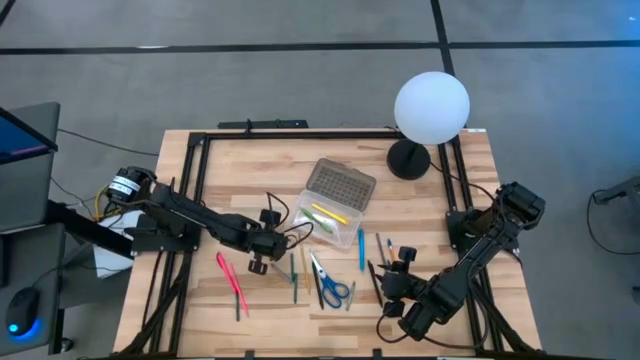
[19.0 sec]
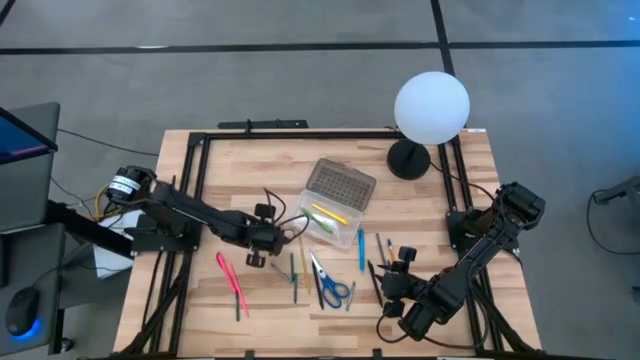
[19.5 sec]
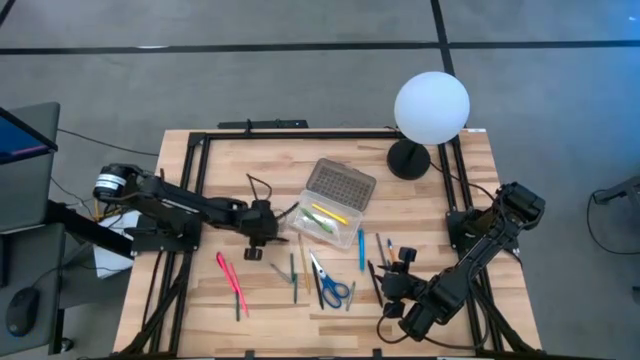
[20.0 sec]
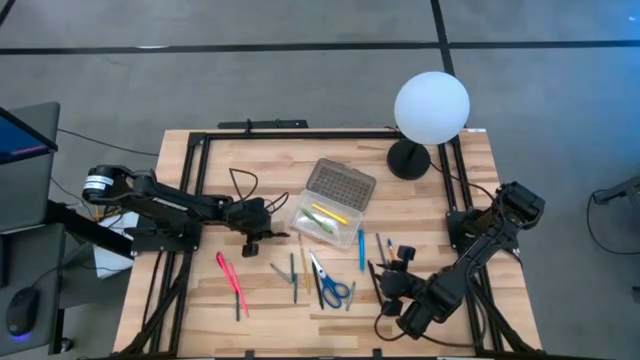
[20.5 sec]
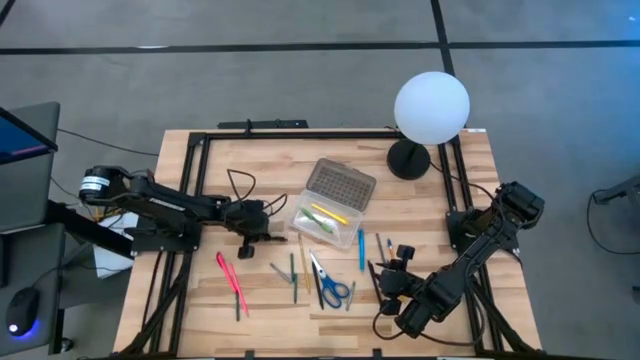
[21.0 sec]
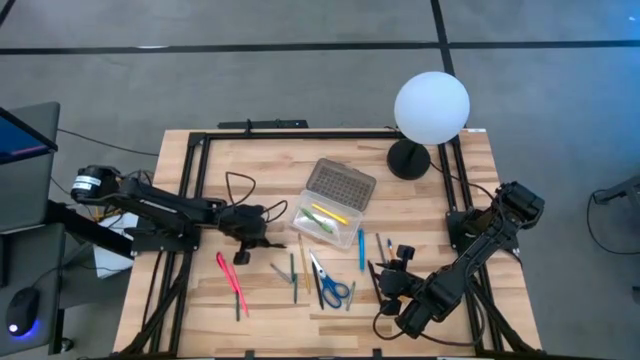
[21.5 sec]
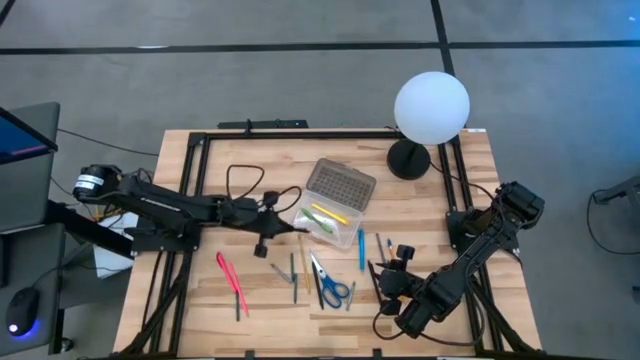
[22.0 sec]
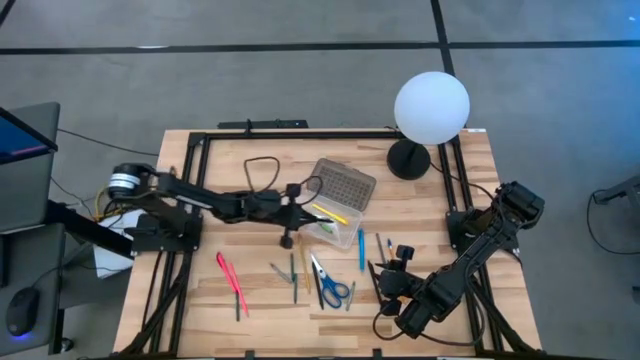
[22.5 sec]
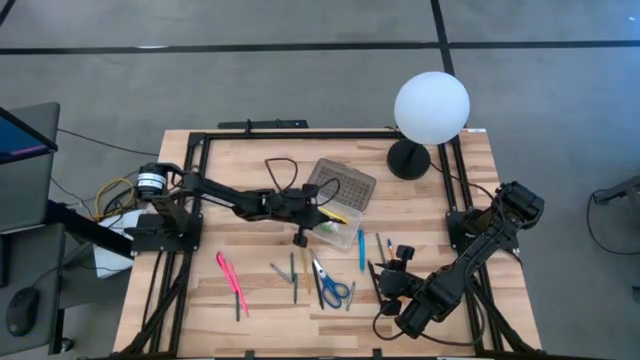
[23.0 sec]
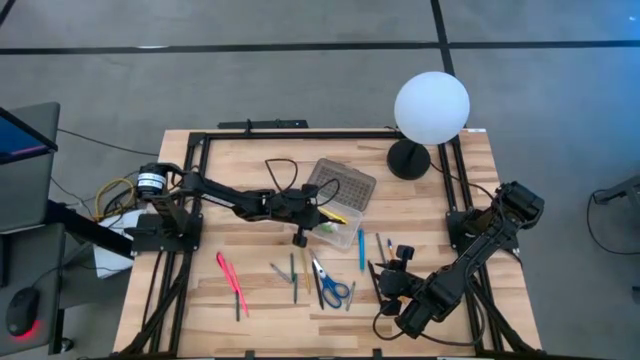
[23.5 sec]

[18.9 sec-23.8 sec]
Task: Pick & place school supplies into a supply box
Put the black pen into the gray supply box

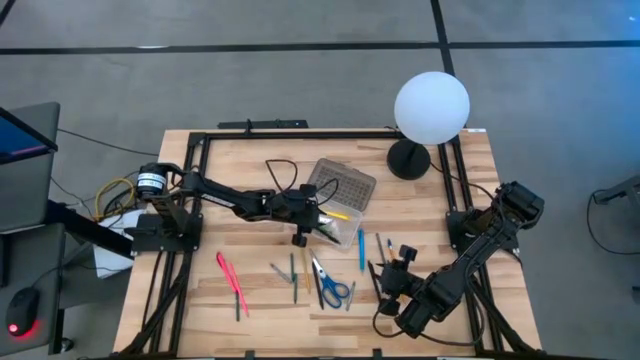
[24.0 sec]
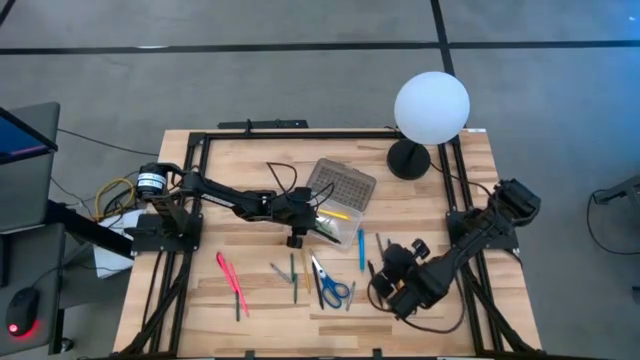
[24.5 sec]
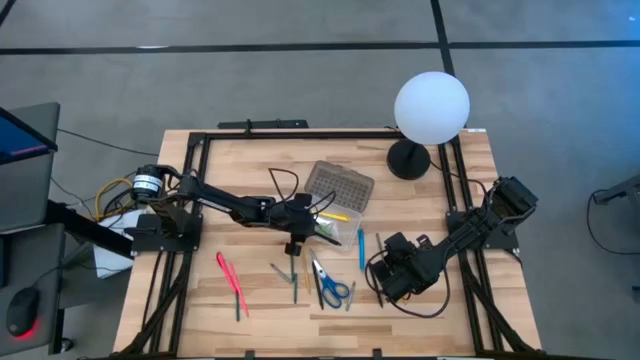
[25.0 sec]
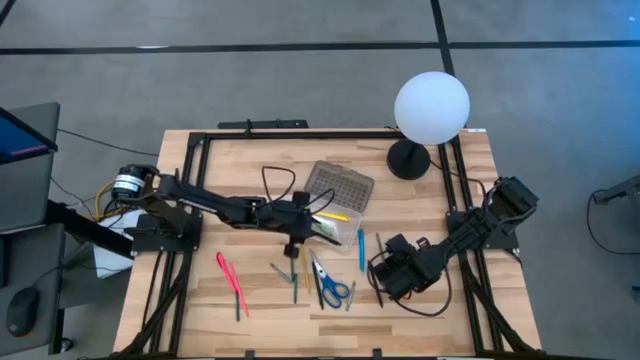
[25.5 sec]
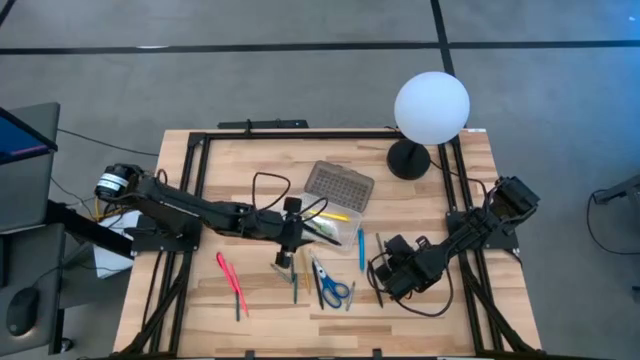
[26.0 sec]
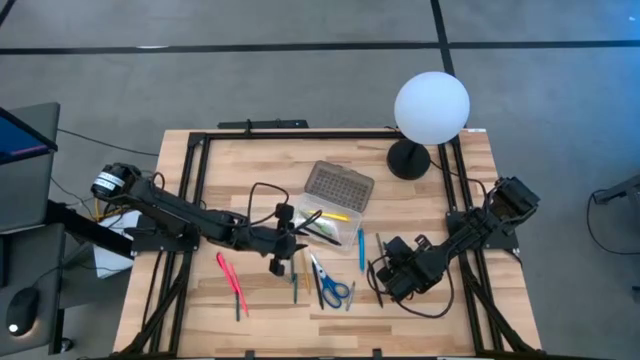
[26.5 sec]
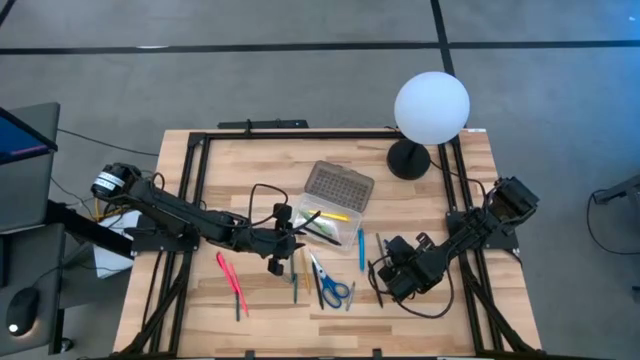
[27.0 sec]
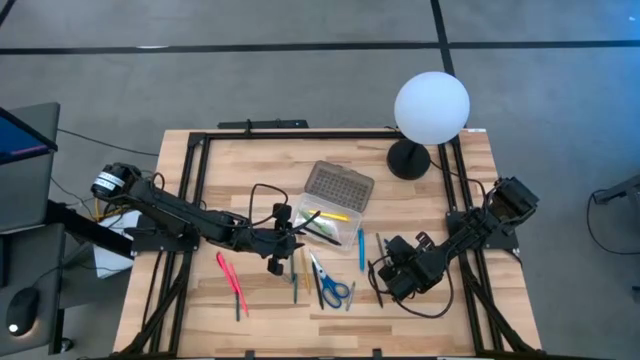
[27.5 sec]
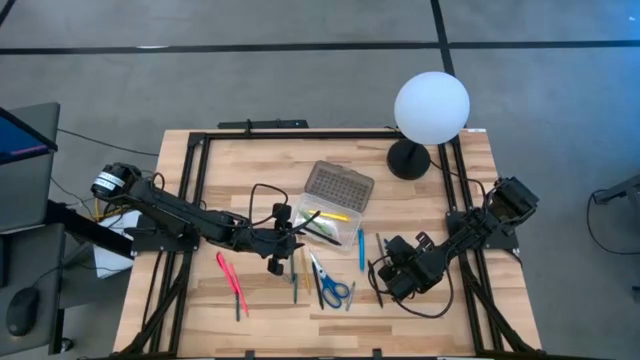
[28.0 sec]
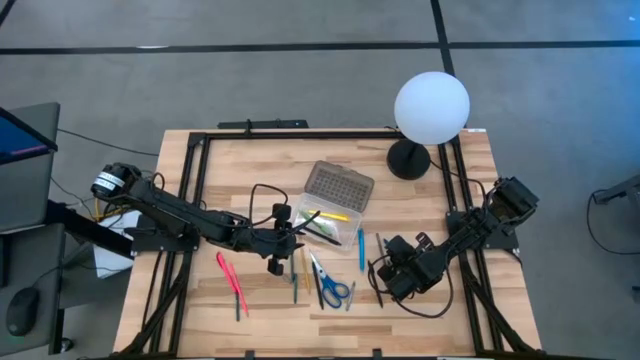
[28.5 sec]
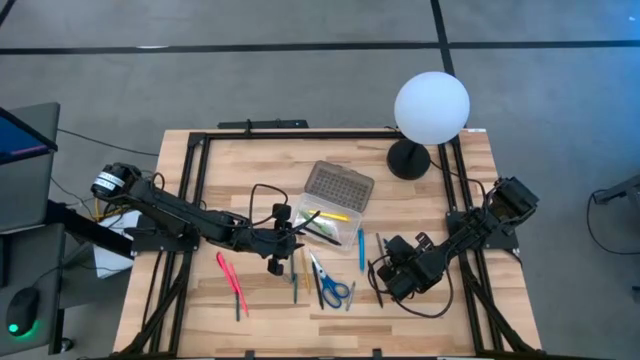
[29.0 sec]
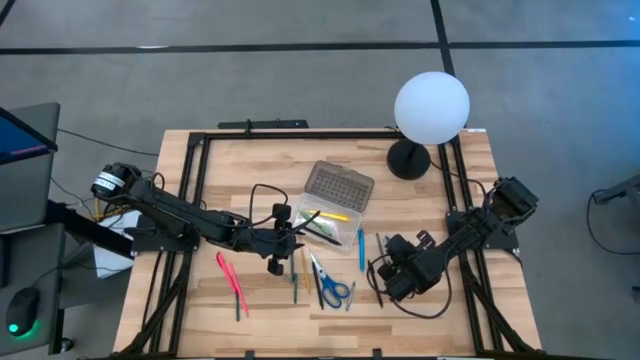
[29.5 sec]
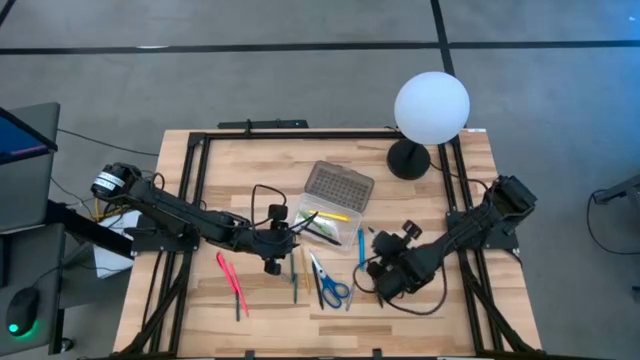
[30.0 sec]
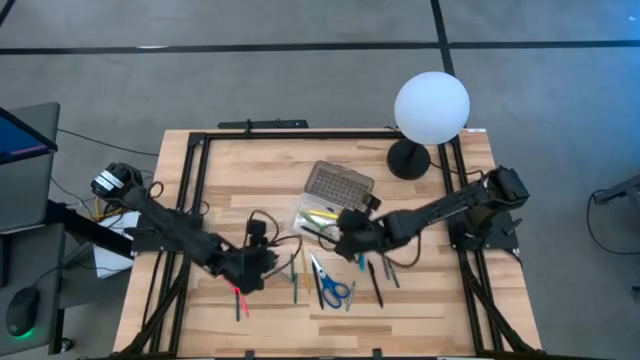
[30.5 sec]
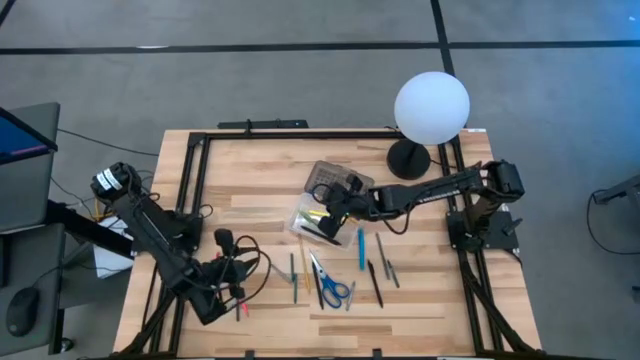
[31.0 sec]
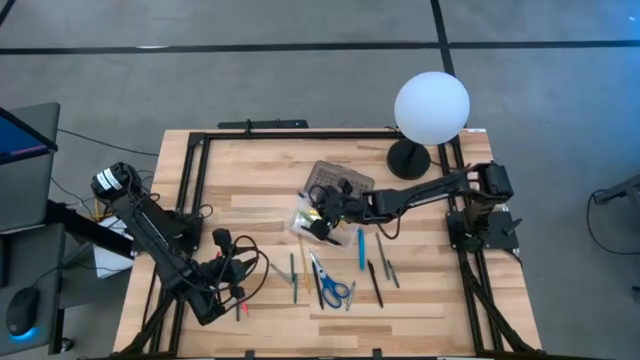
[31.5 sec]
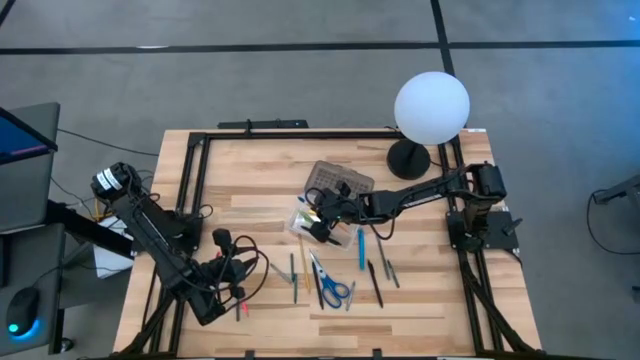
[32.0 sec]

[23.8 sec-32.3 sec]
Put the orange pencil into the gray supply box

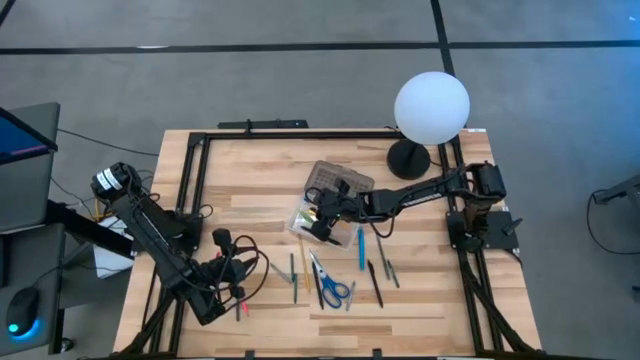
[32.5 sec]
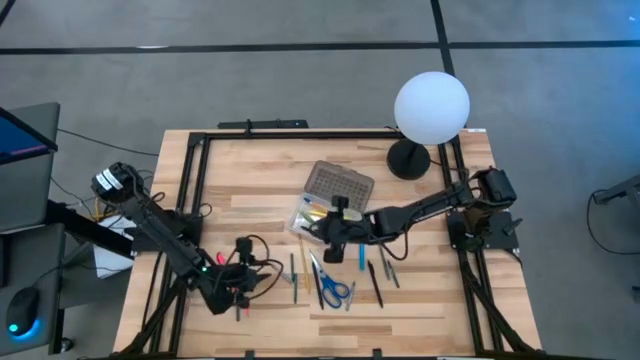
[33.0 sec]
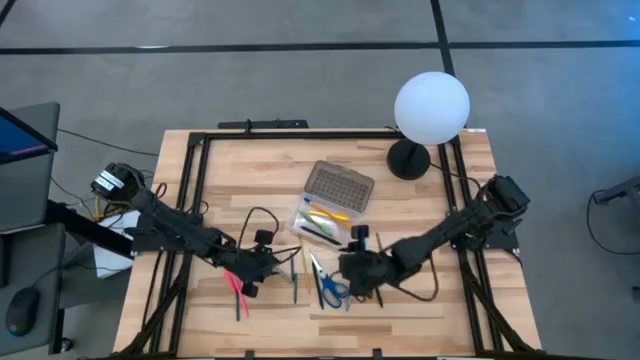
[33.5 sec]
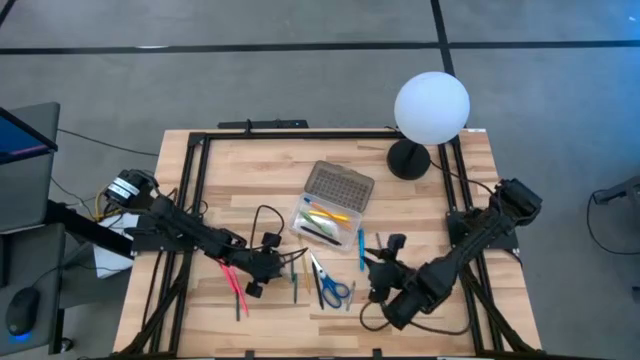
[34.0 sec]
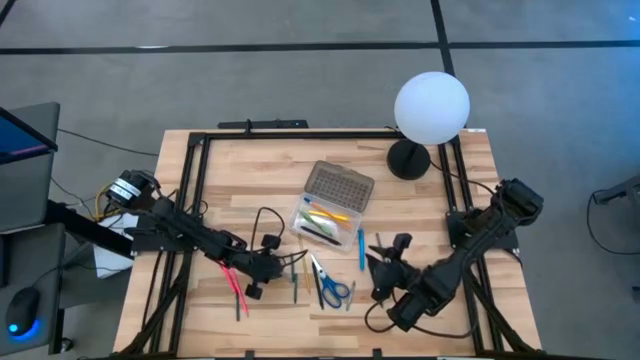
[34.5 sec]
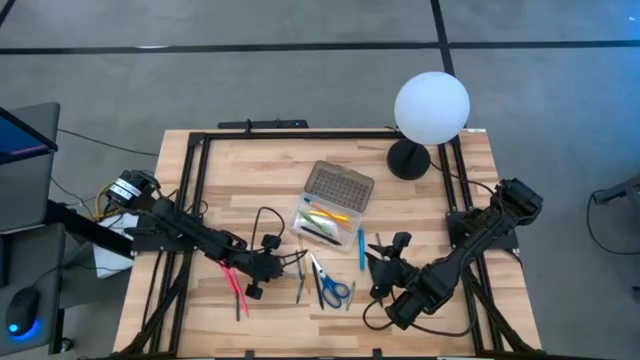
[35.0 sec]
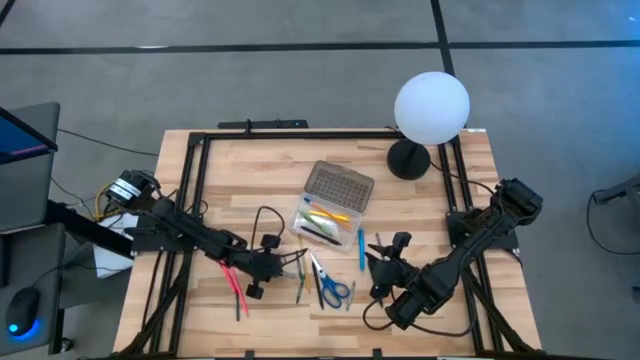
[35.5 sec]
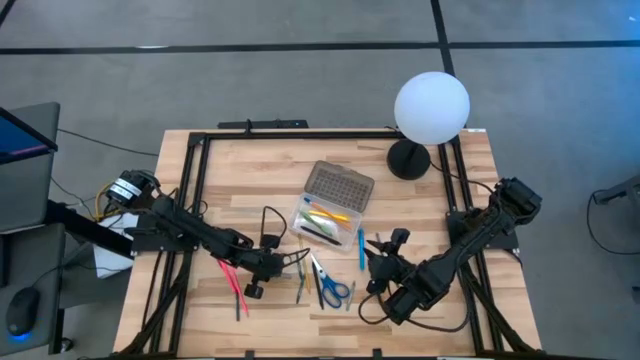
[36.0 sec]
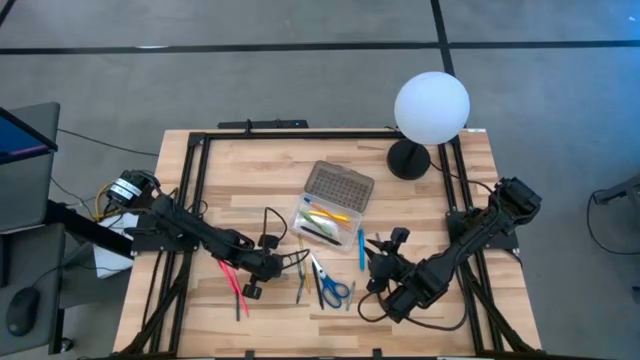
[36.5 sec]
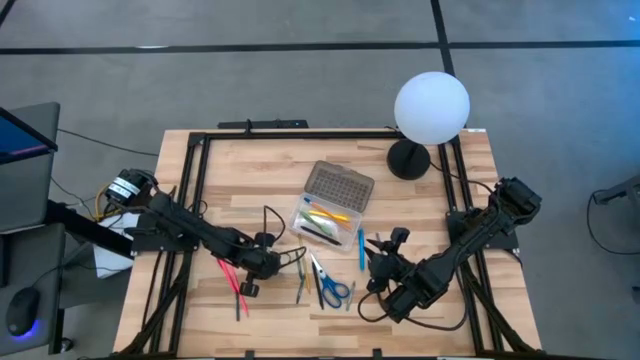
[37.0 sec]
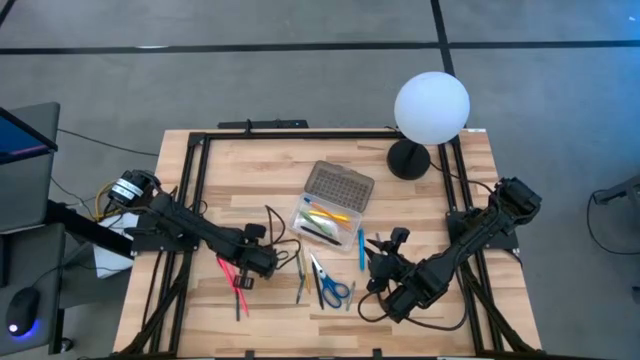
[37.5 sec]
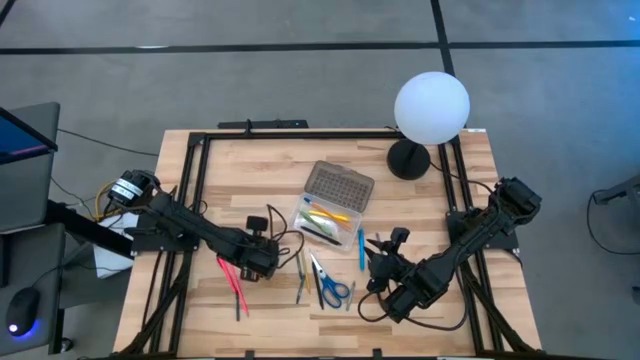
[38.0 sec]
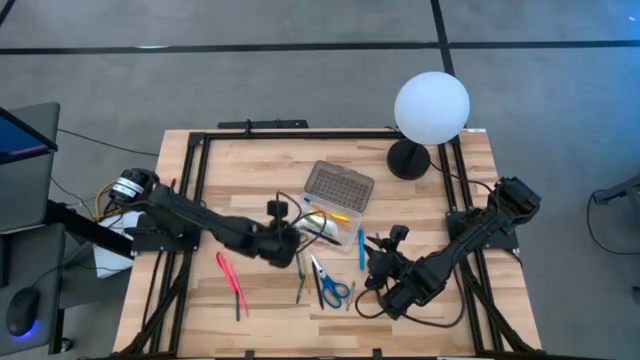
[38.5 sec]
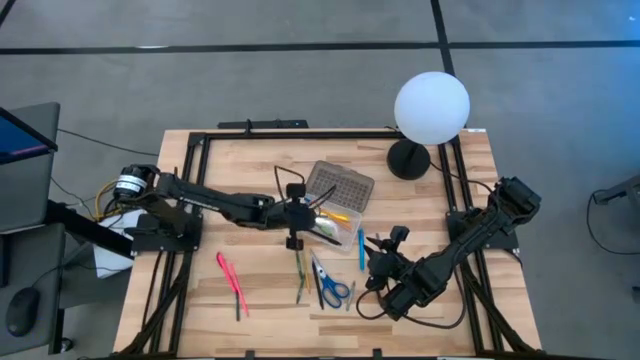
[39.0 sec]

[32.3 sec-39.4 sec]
Put the gray crayon into the gray supply box
